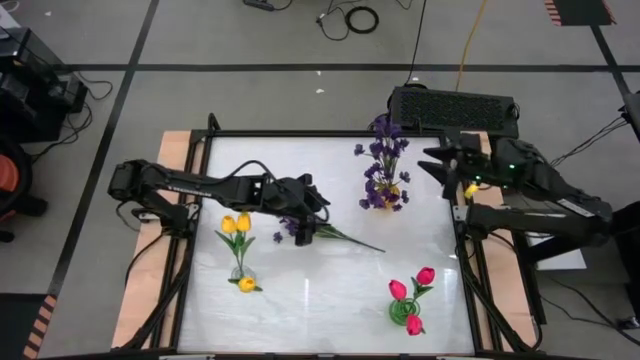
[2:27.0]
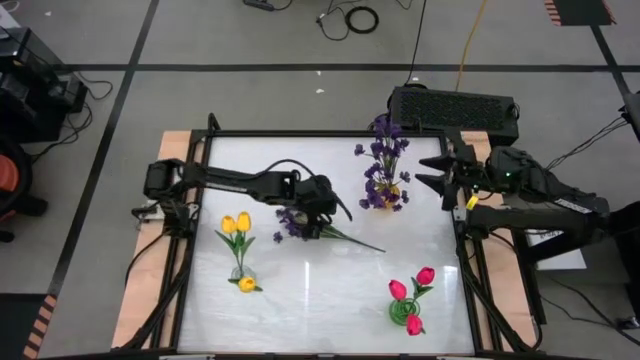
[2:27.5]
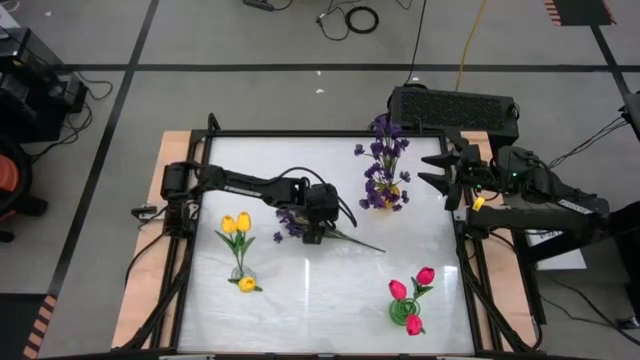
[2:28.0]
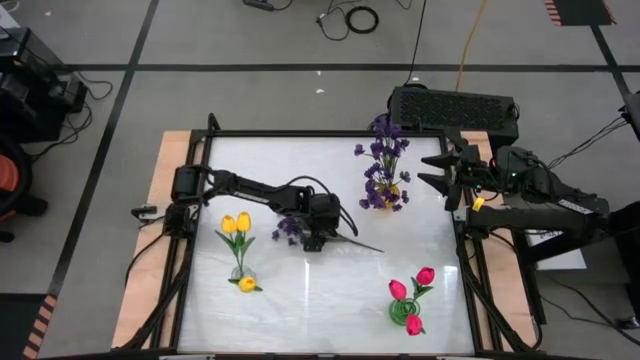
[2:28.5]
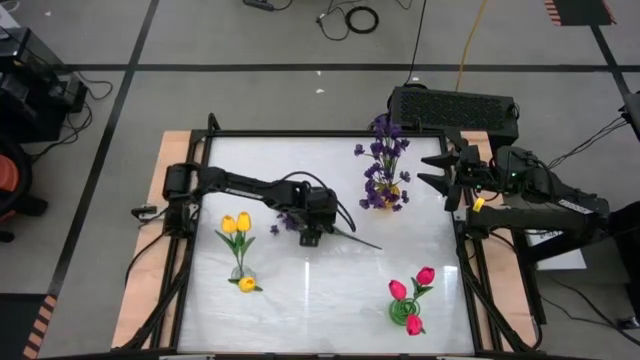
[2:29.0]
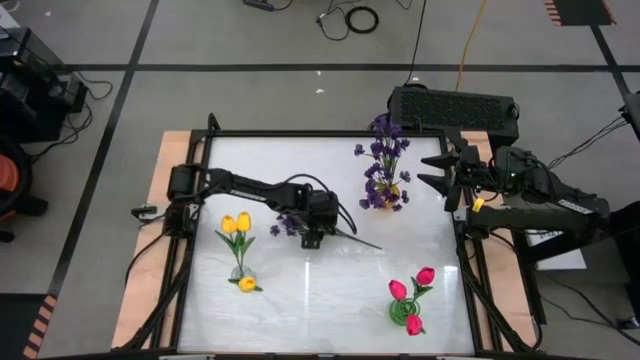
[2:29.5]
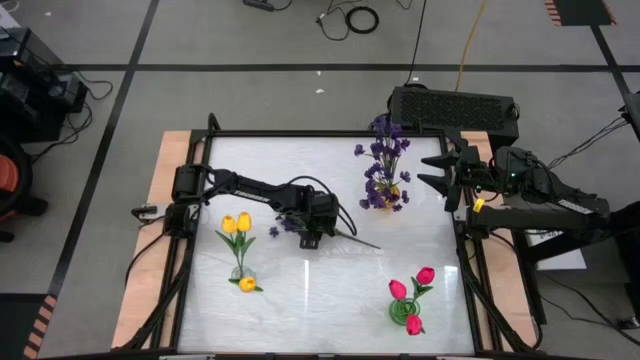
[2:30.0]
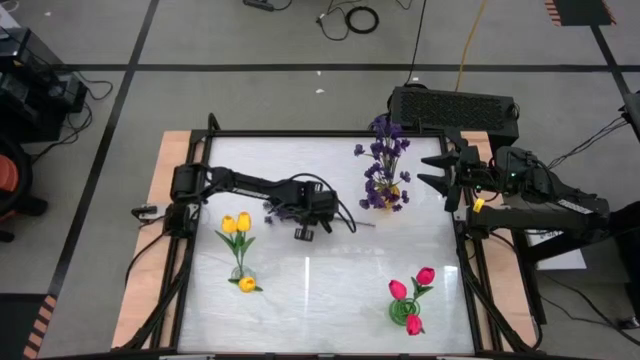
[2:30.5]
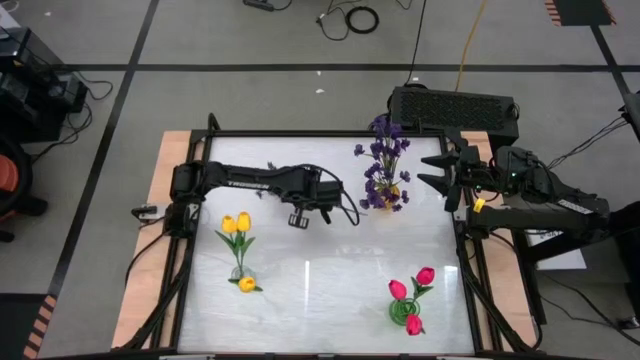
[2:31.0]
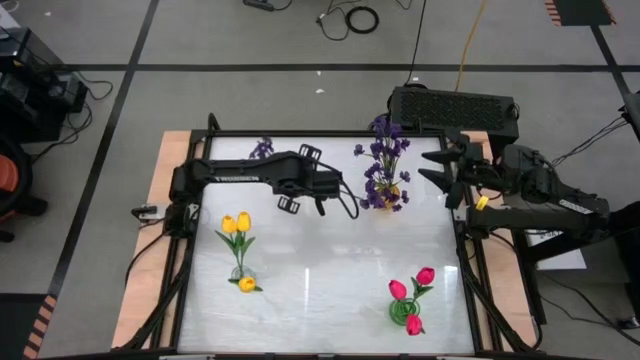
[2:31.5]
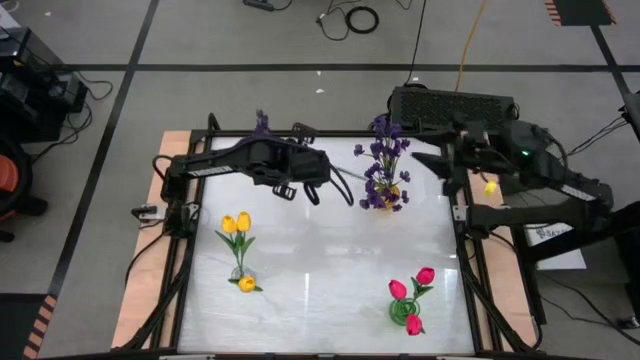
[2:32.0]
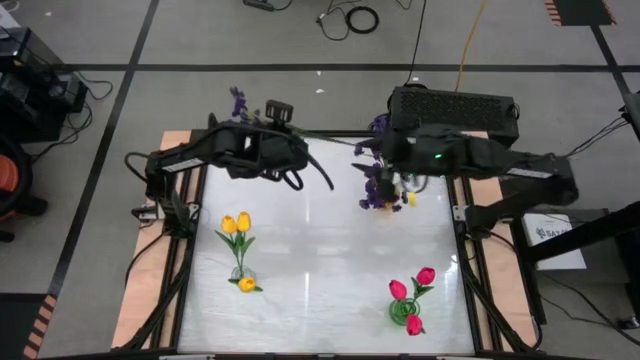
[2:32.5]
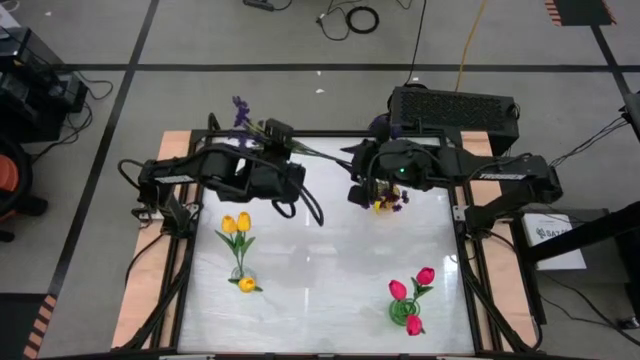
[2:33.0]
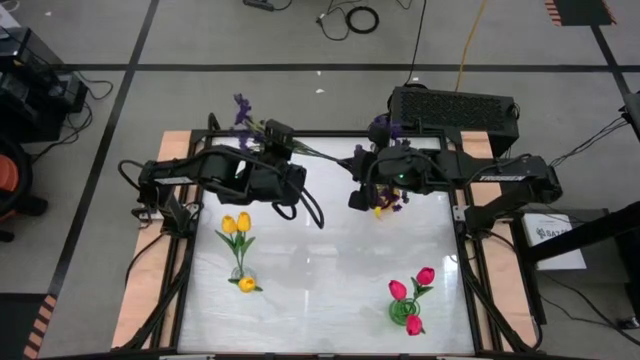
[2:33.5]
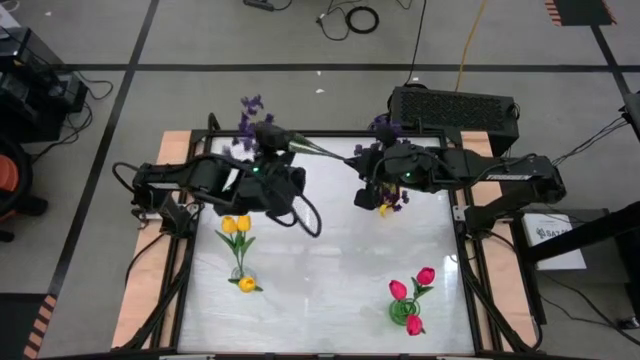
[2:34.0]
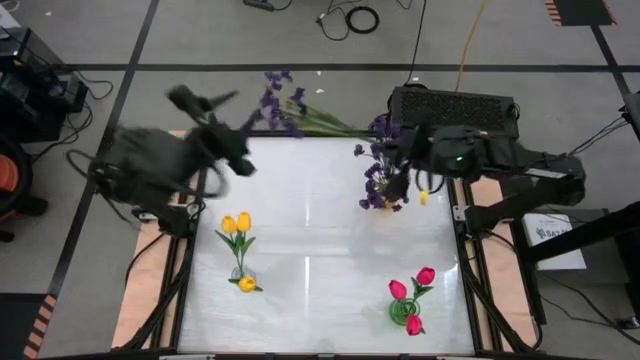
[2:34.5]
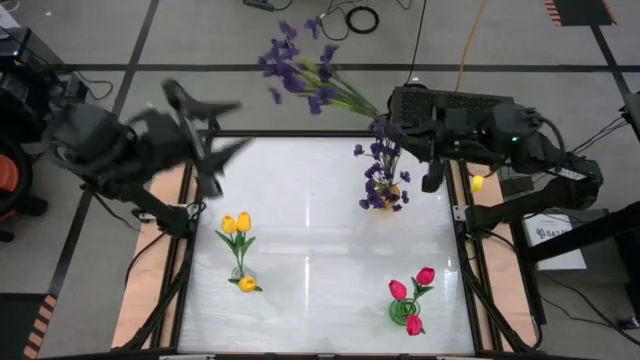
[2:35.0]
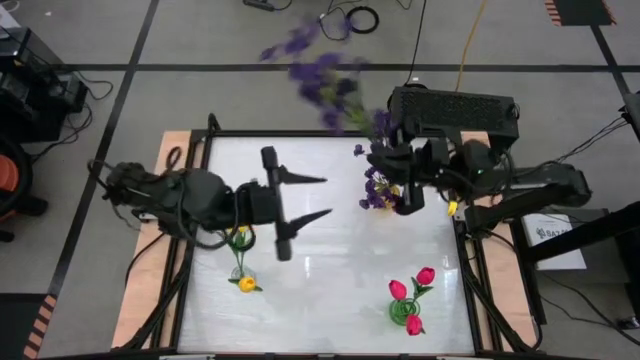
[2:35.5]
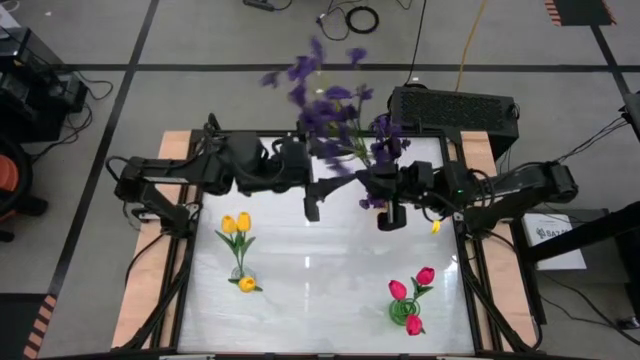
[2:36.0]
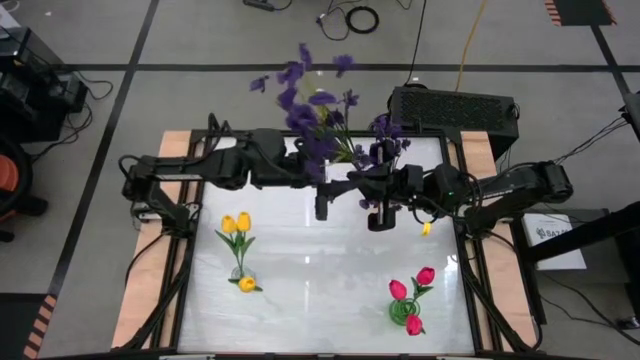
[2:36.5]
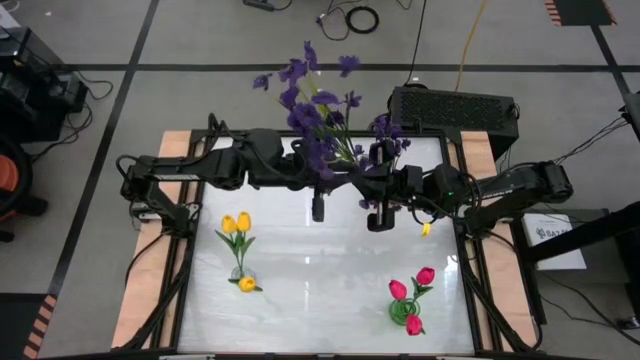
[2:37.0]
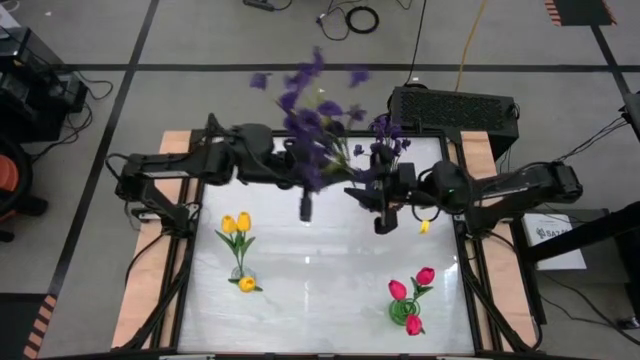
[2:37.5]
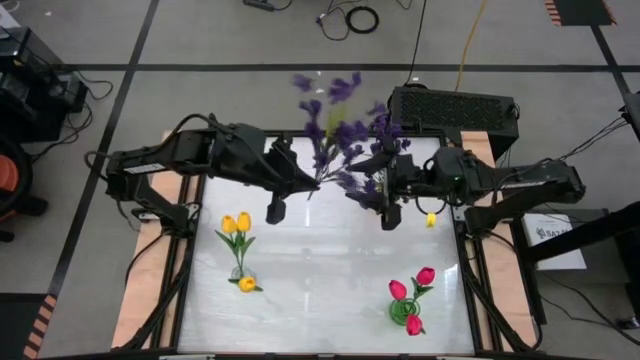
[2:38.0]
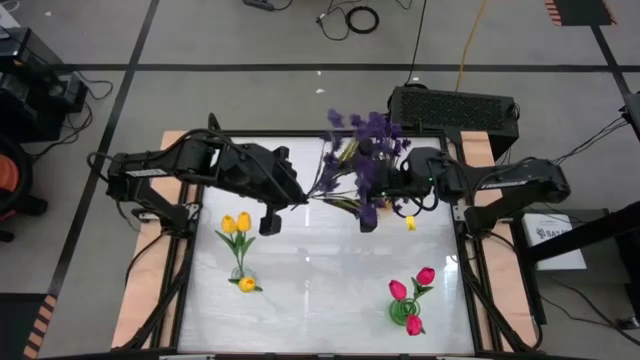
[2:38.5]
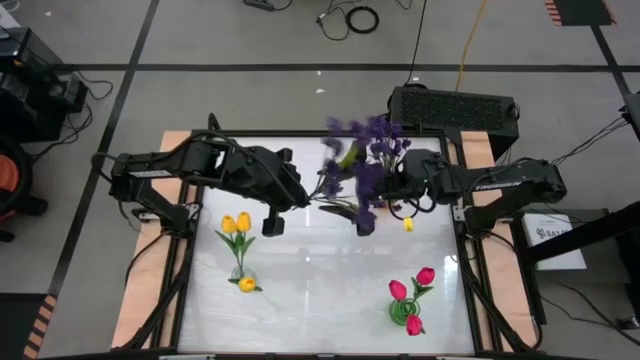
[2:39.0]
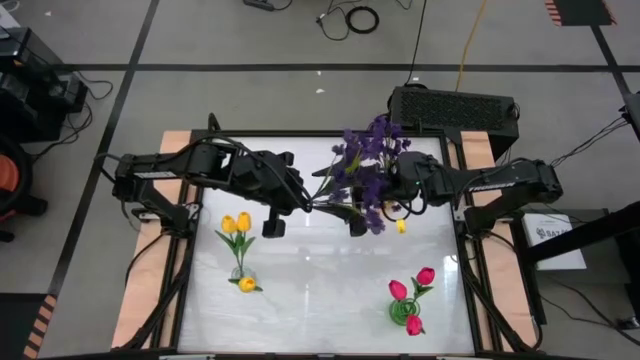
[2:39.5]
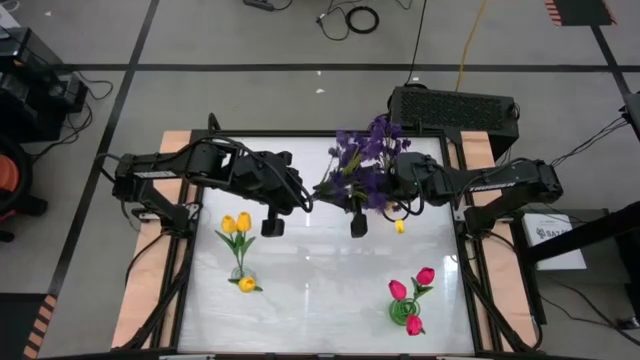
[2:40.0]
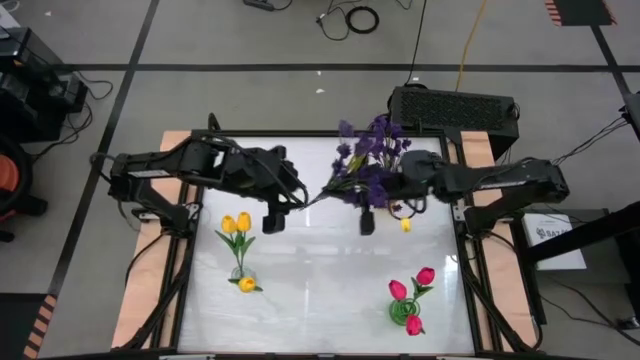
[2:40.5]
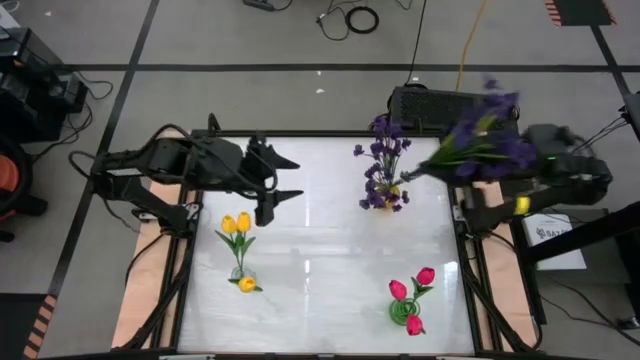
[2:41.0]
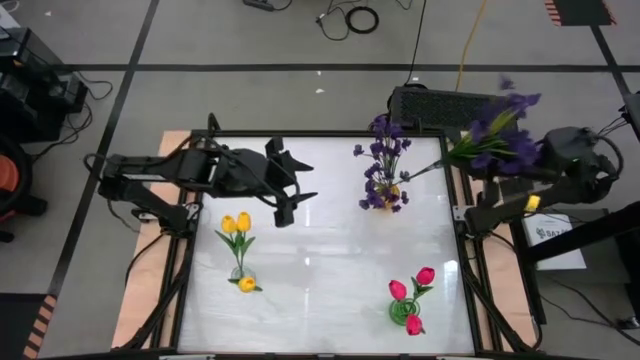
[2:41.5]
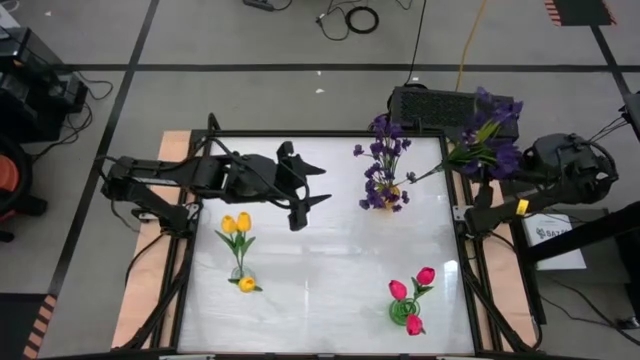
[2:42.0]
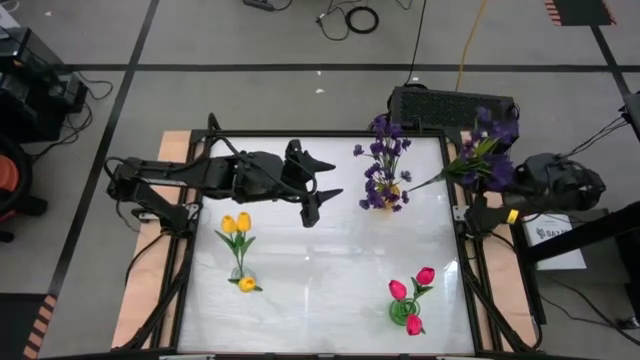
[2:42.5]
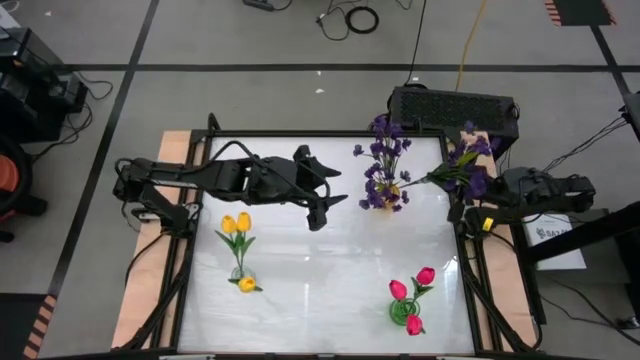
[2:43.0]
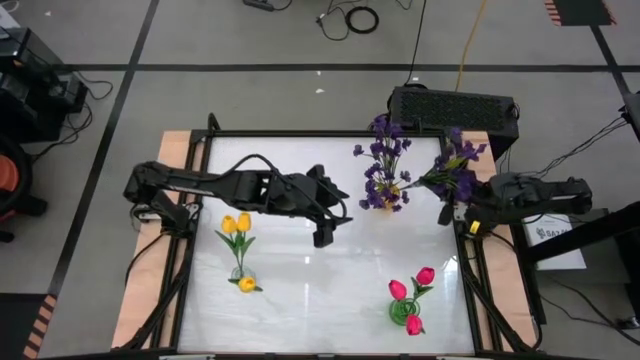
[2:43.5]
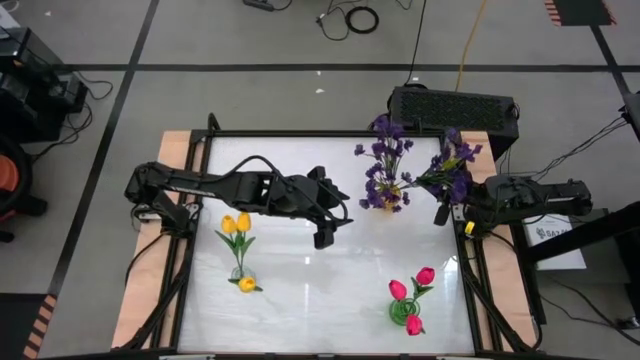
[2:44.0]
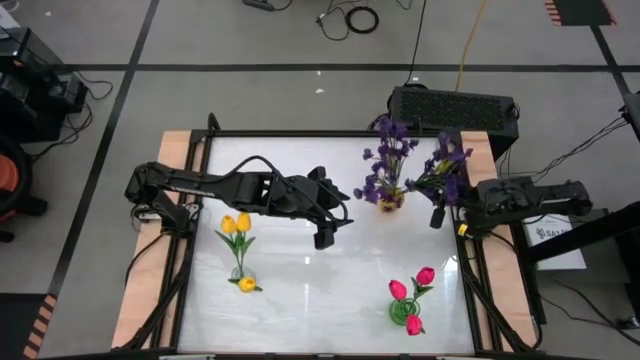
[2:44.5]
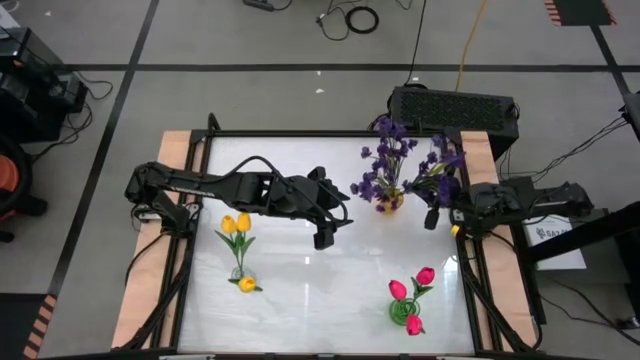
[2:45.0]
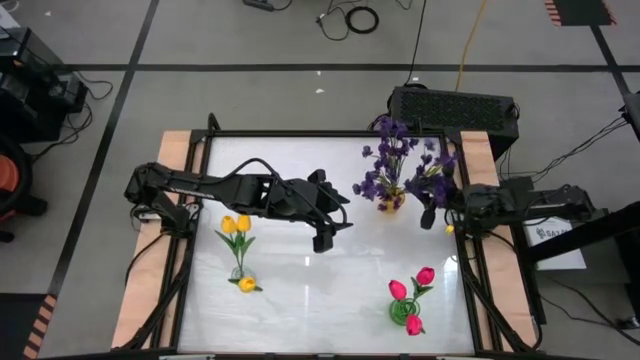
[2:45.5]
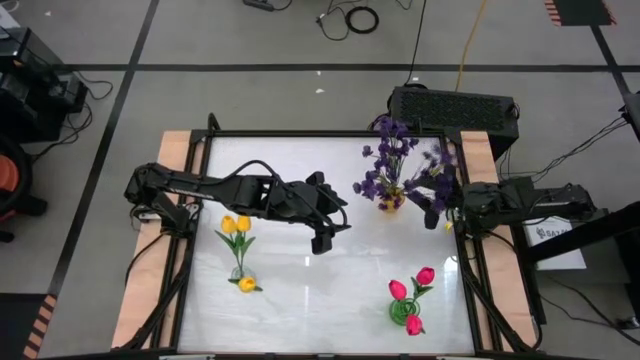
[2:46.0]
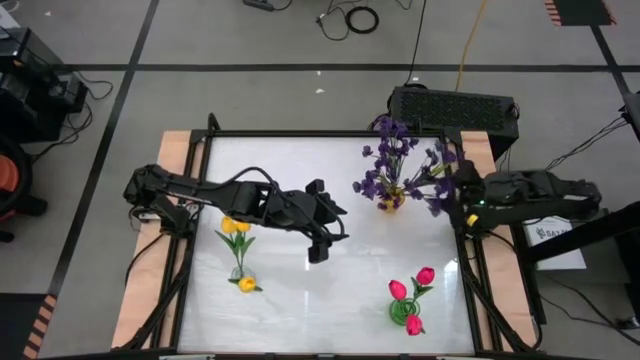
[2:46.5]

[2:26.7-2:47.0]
Task: Sort flowers into vase by color
Put the purple flowers into the yellow vase

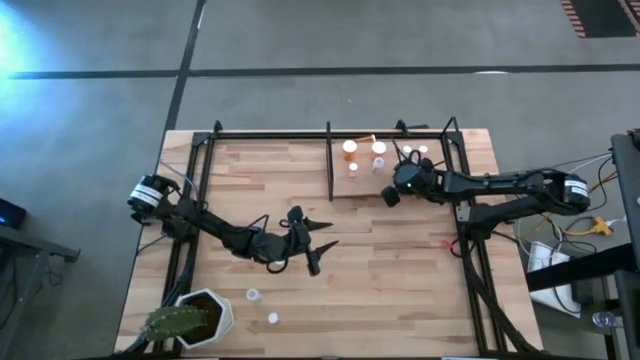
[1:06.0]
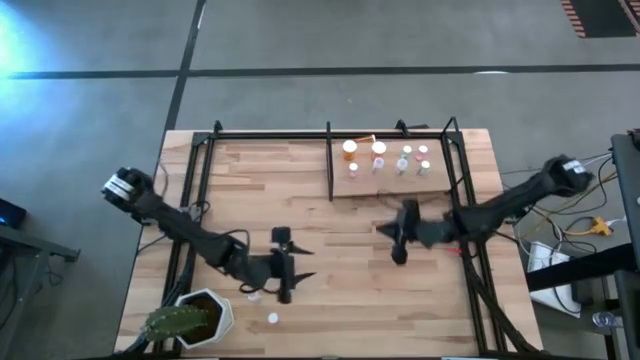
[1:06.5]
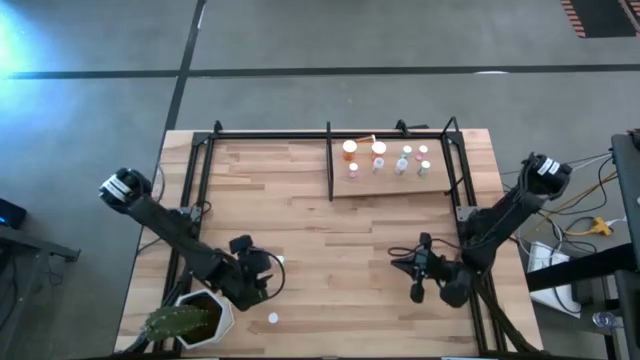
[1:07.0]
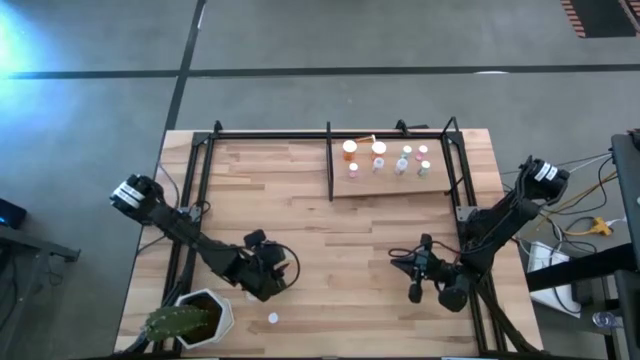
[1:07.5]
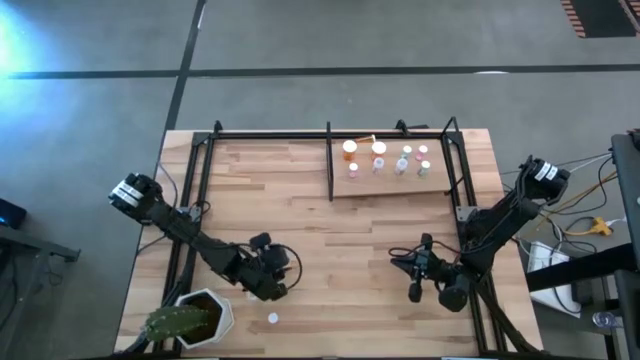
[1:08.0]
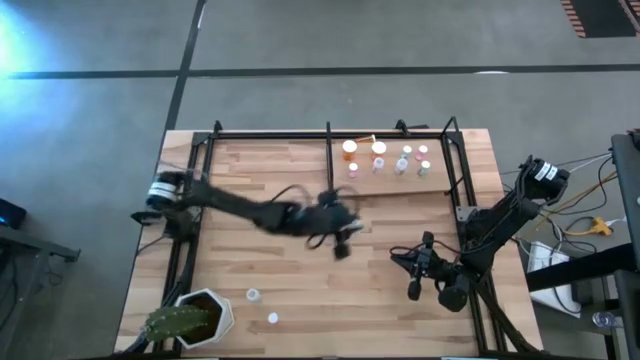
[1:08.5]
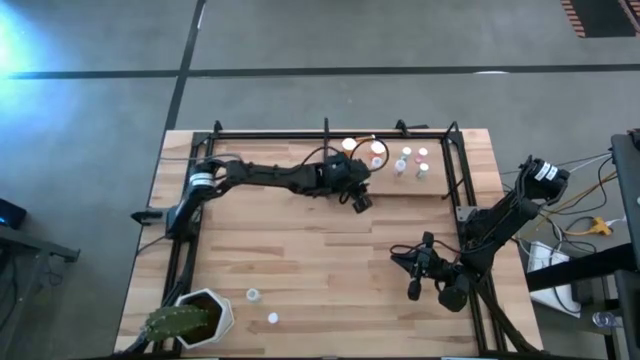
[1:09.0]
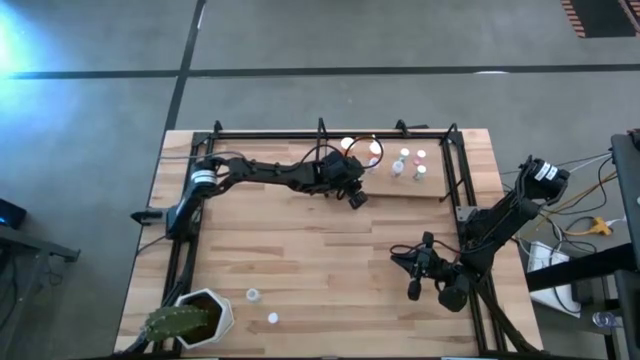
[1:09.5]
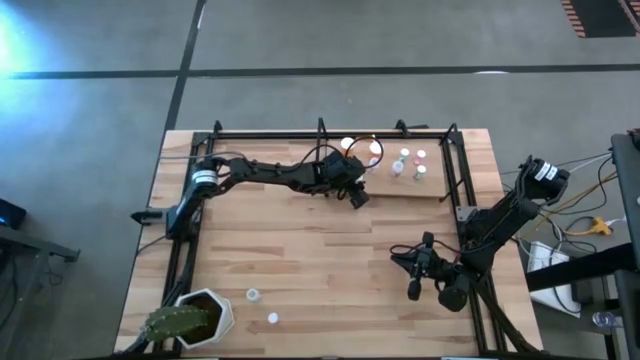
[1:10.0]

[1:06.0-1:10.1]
Task: Pick and place medicine bottles onto shelf by color
Put the blue pill bottle on the shelf
